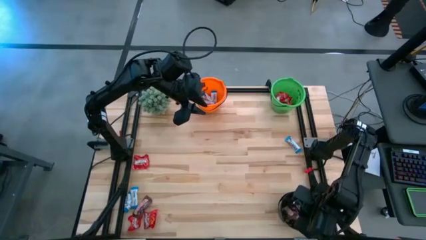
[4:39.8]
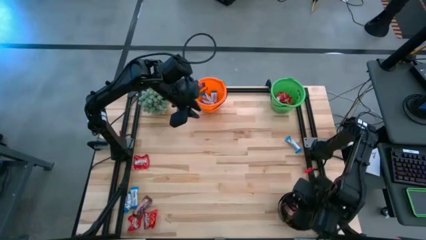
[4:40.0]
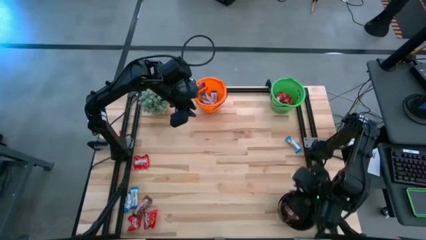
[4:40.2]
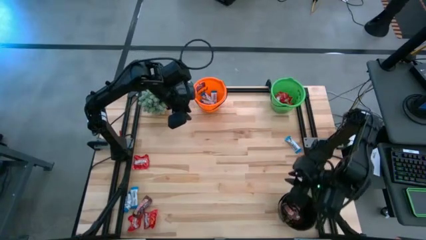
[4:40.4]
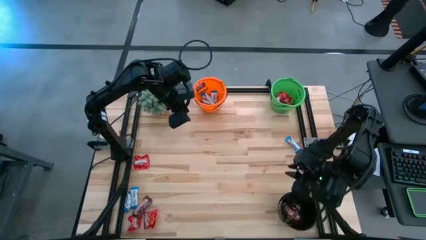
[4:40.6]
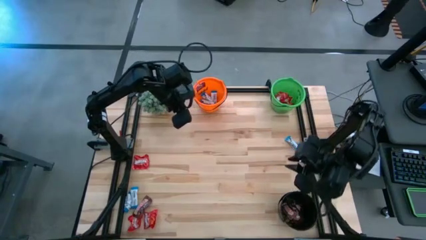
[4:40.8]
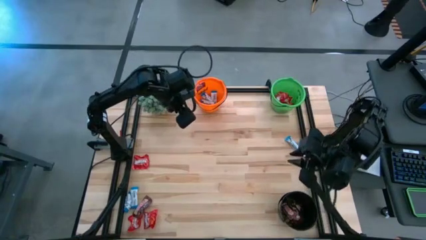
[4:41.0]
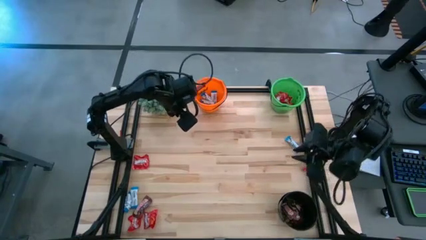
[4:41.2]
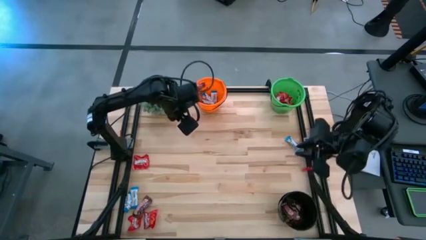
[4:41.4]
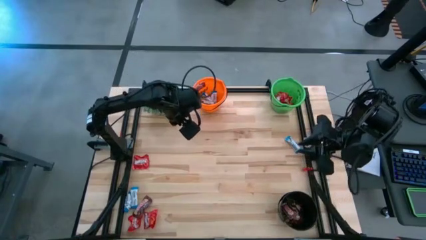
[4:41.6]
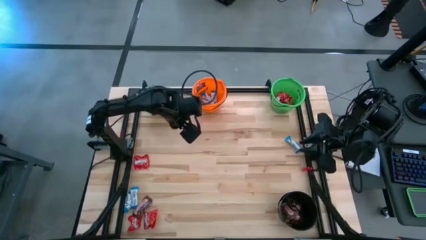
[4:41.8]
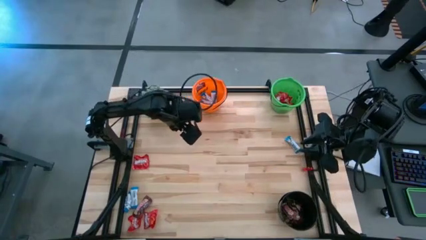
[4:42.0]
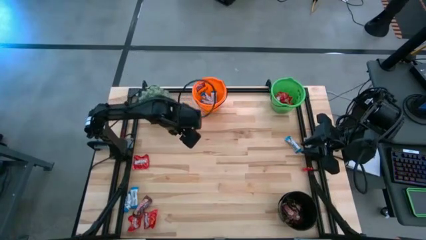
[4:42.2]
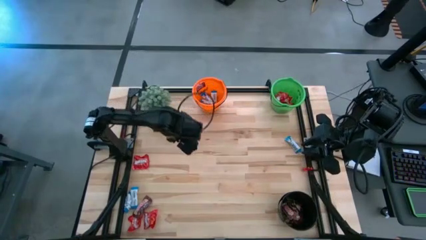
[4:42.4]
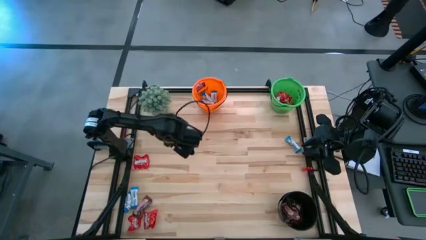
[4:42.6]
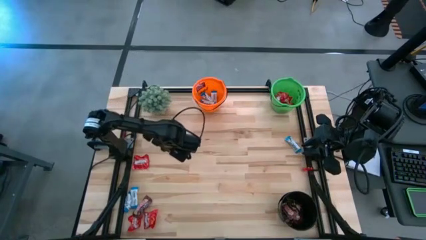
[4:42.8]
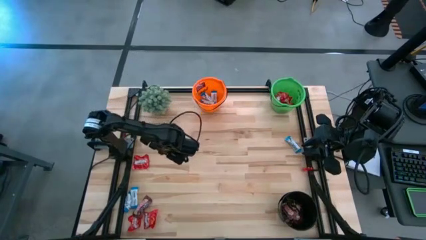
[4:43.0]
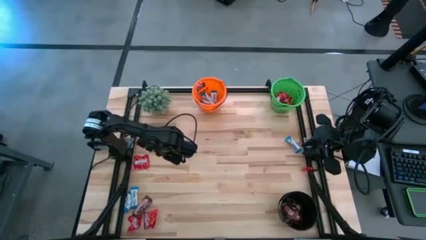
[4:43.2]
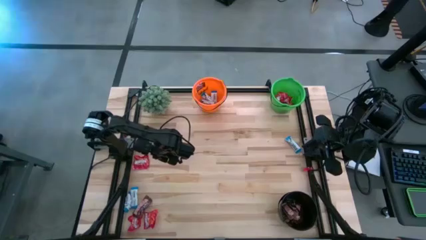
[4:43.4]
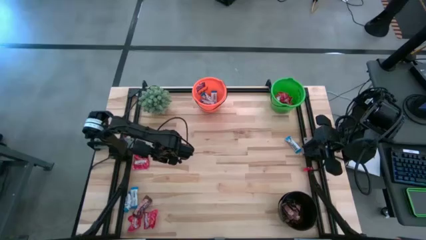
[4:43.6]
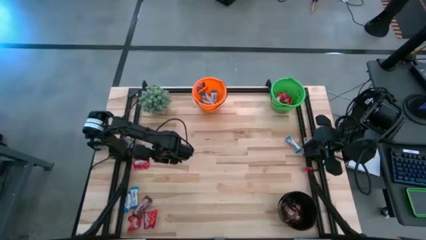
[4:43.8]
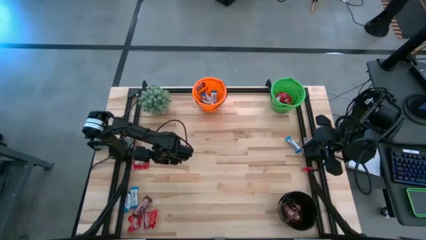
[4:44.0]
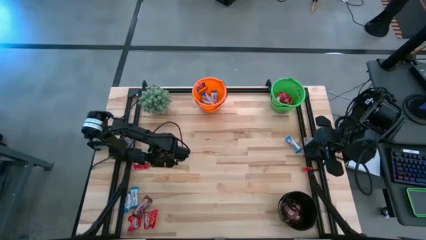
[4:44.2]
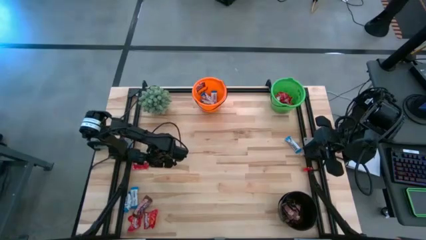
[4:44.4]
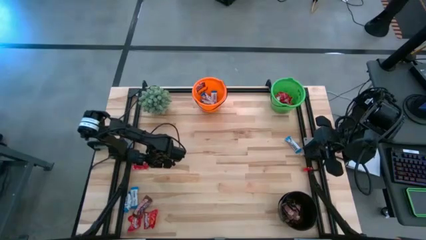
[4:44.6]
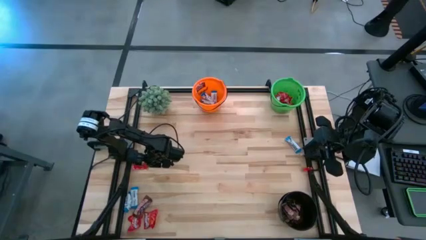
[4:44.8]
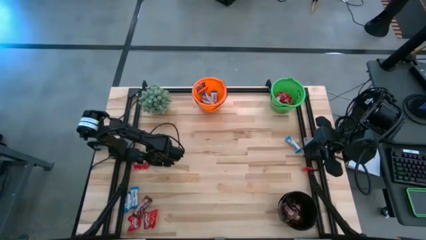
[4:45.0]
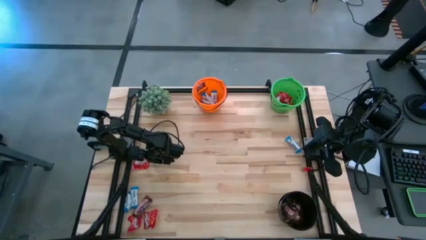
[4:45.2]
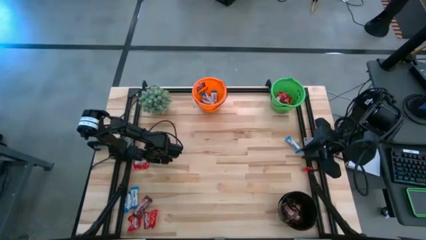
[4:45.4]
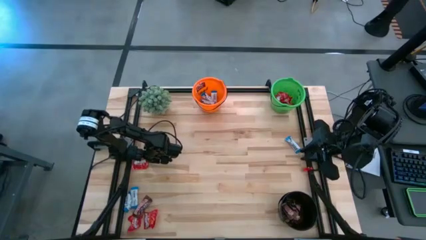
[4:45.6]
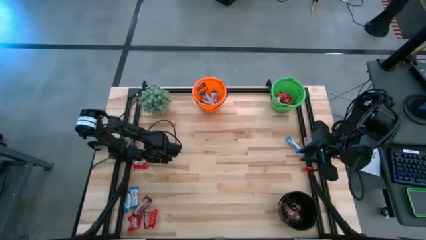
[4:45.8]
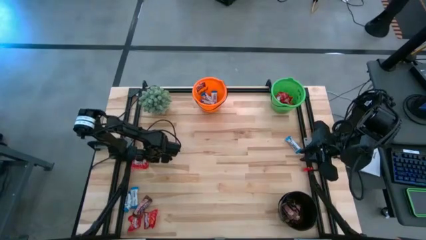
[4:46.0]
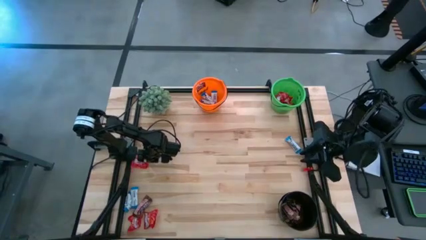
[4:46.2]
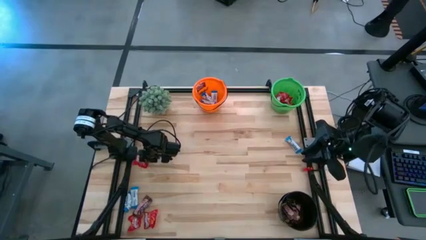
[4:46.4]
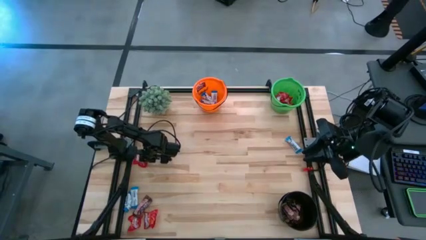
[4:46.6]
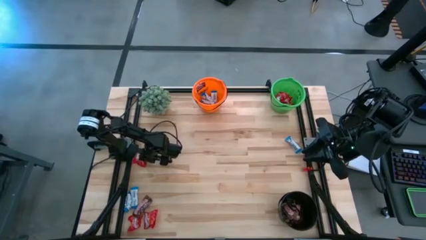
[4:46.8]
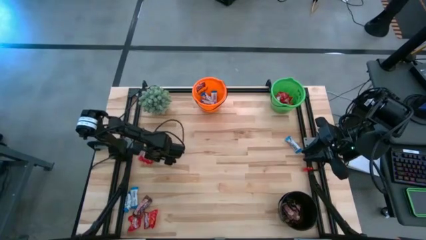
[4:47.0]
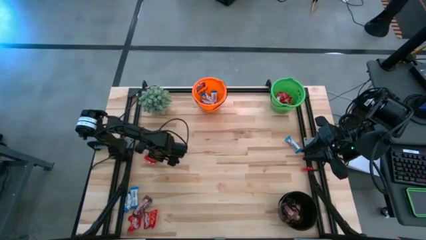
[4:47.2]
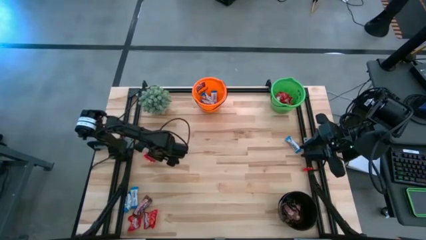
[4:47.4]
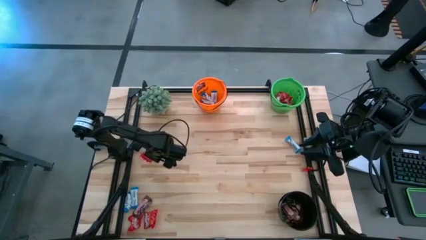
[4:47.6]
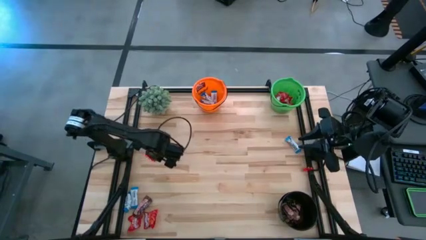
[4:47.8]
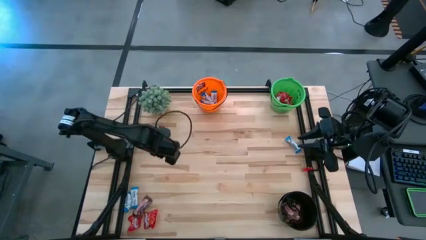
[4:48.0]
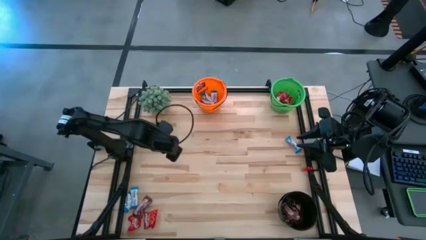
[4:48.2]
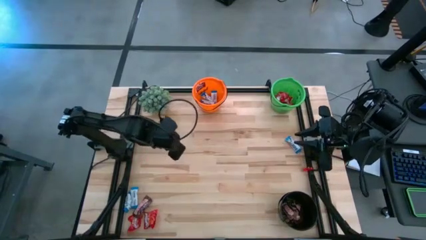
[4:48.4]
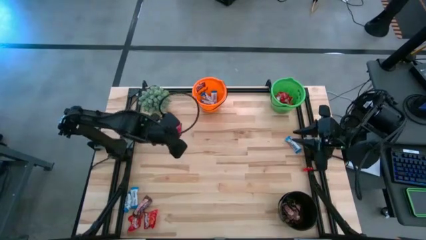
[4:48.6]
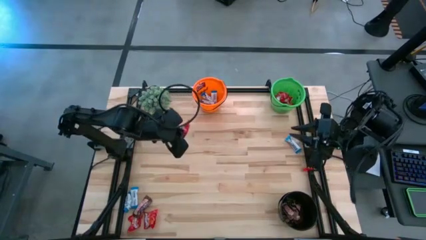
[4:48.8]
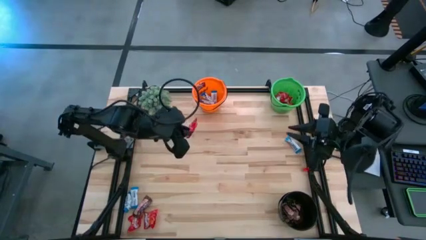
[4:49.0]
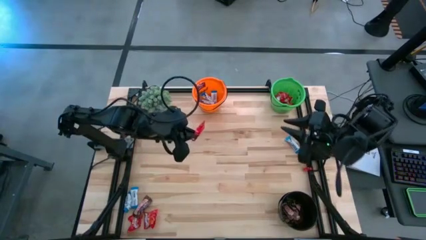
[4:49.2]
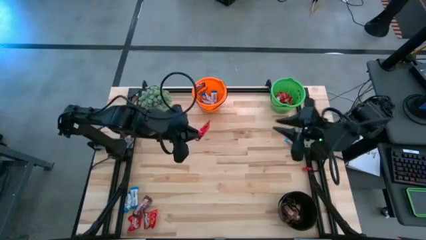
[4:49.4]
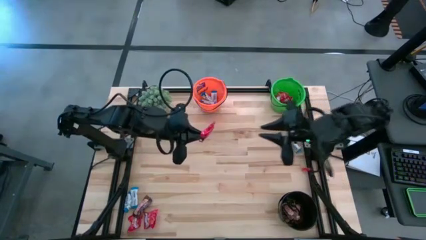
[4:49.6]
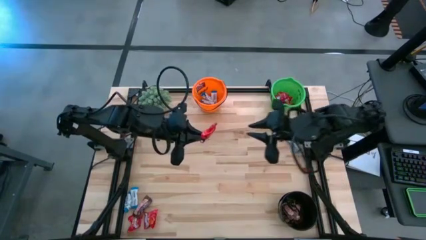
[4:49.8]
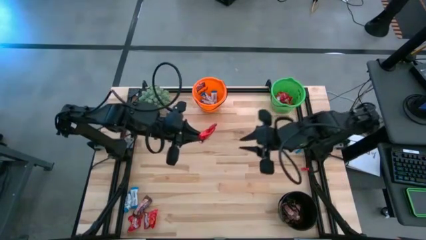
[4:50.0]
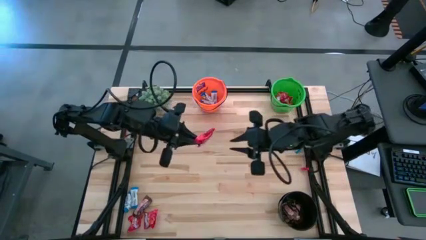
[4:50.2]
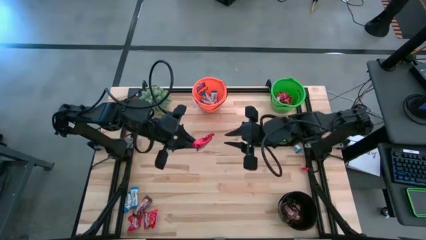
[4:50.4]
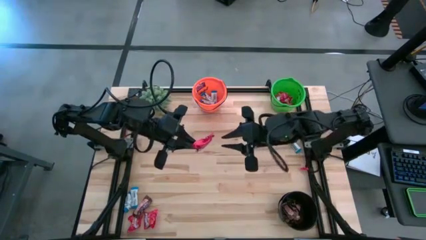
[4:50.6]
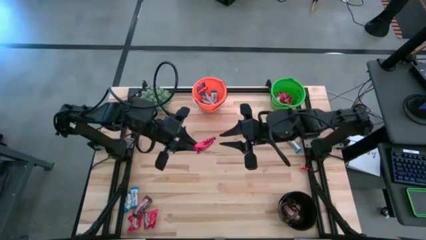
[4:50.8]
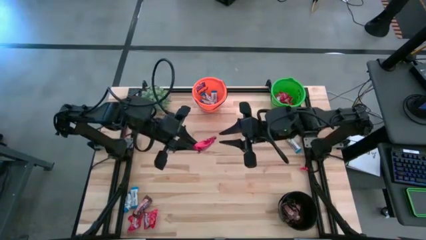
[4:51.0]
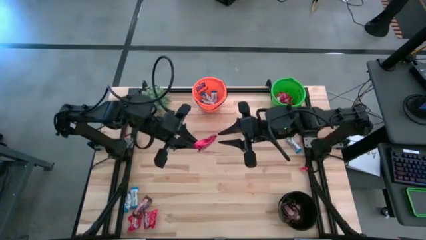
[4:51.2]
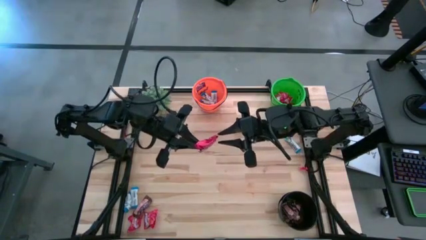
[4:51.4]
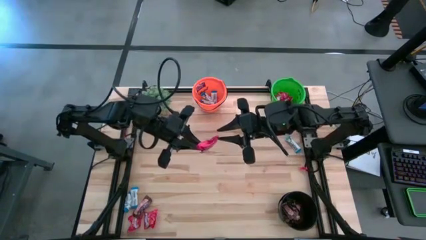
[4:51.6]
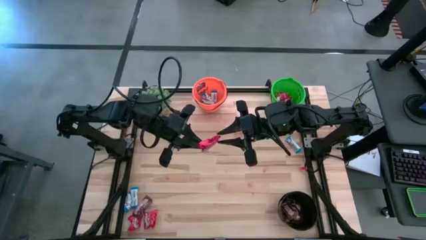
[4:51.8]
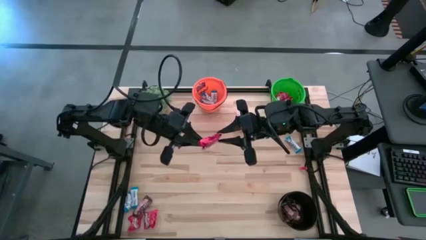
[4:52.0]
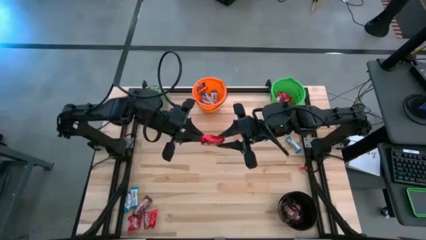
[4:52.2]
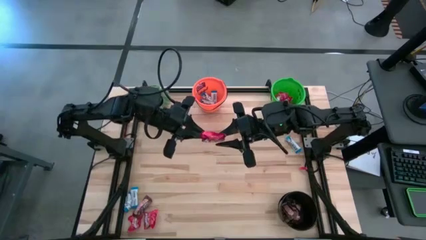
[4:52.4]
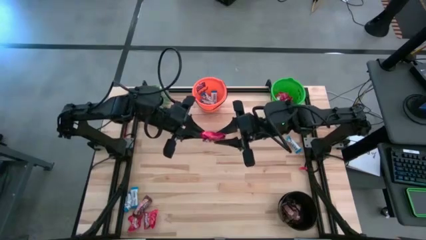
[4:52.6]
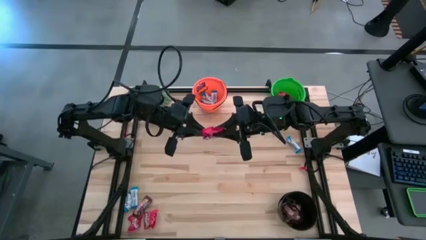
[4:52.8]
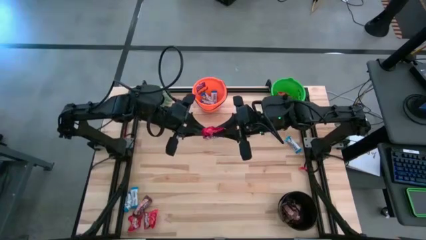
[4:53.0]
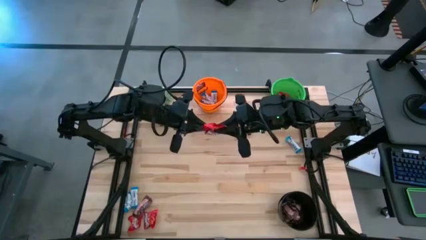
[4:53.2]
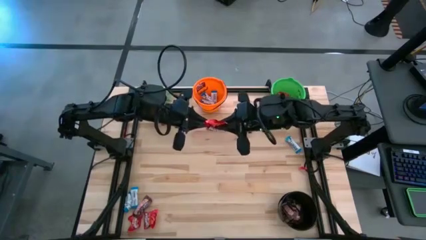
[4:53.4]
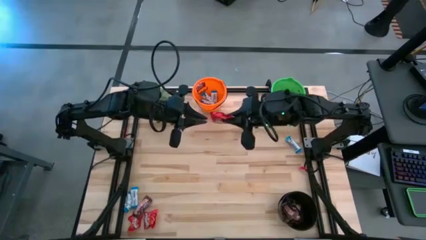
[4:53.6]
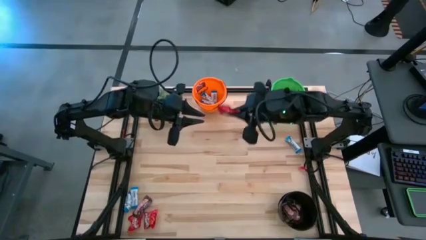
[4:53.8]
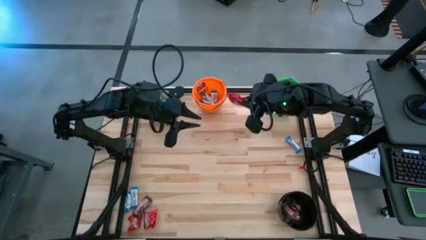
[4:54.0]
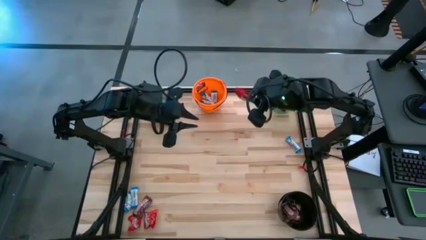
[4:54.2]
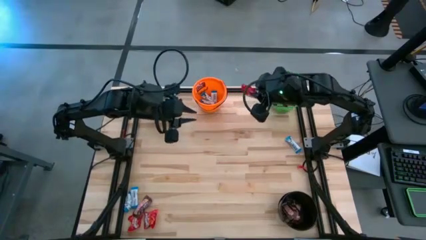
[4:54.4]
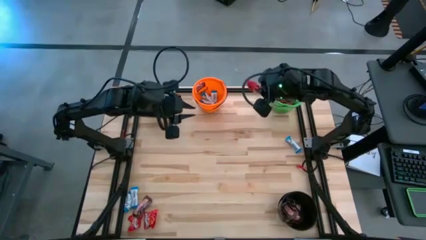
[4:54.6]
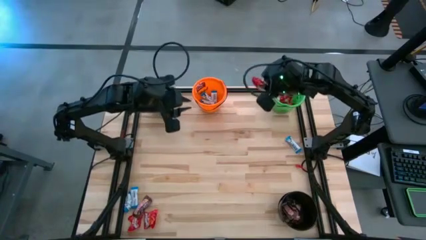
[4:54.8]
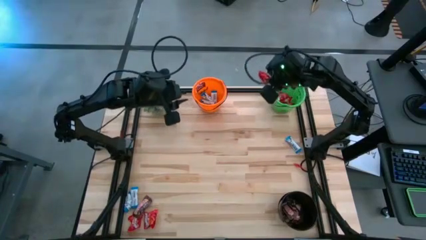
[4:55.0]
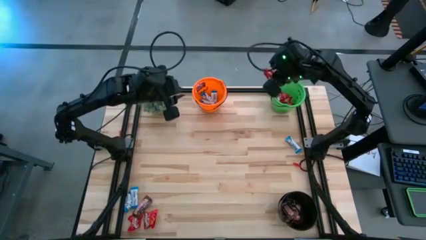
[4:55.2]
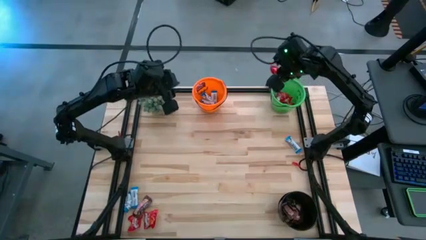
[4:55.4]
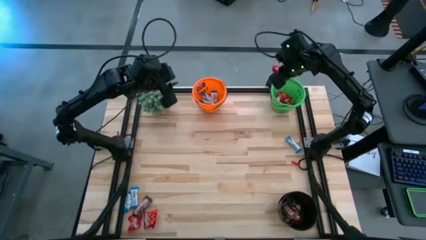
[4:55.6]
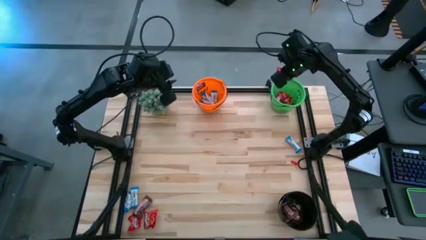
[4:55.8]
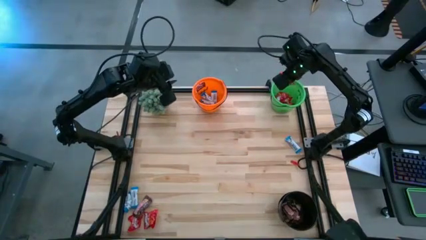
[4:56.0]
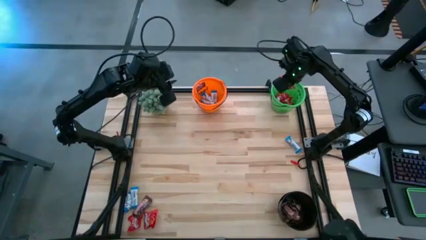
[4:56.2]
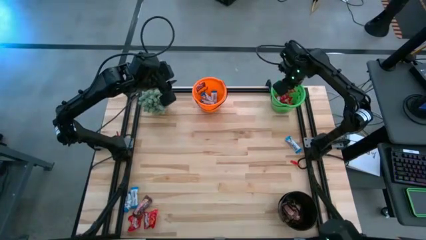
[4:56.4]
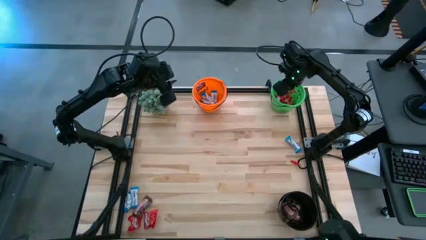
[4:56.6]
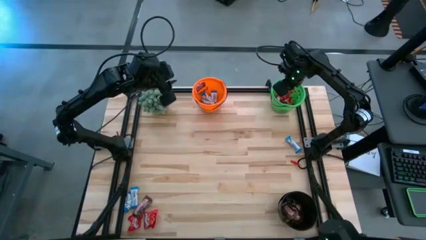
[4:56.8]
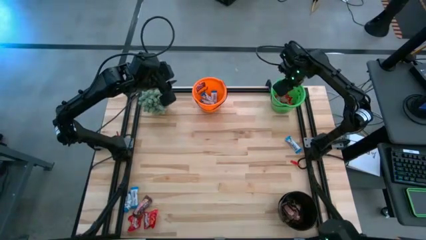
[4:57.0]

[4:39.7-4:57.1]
Task: Organize candy in baskets
Put the red candy into the green bucket
